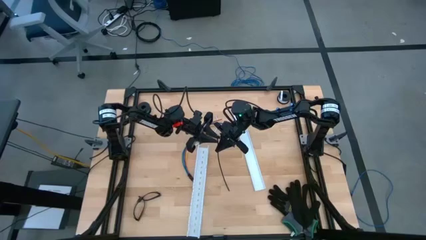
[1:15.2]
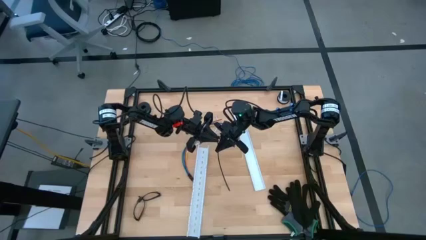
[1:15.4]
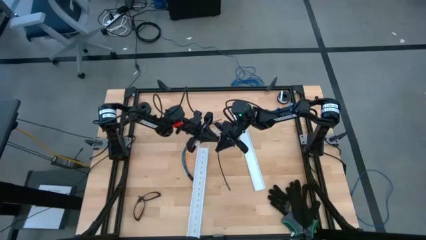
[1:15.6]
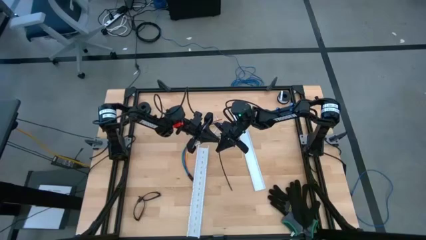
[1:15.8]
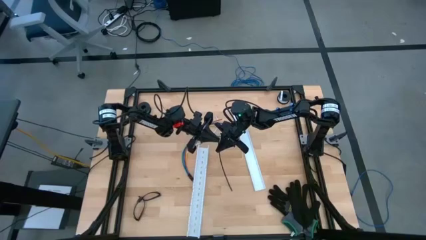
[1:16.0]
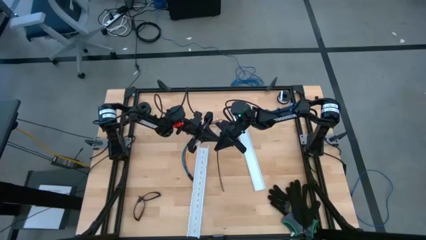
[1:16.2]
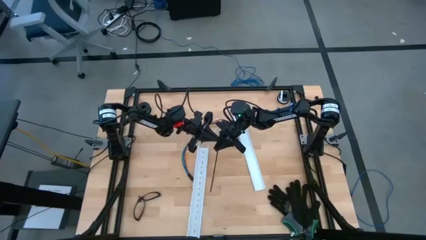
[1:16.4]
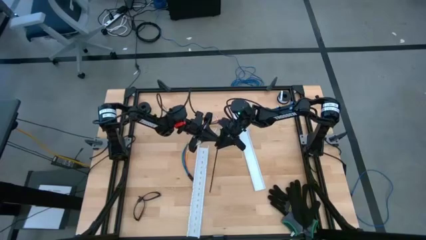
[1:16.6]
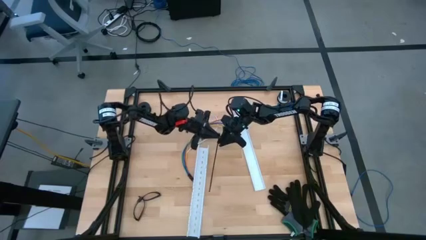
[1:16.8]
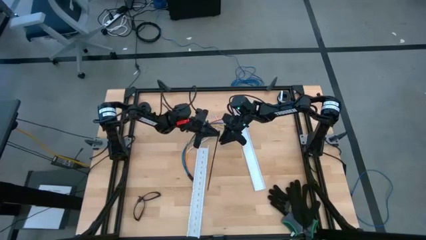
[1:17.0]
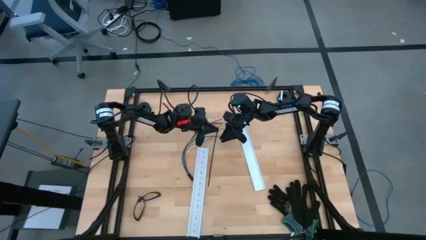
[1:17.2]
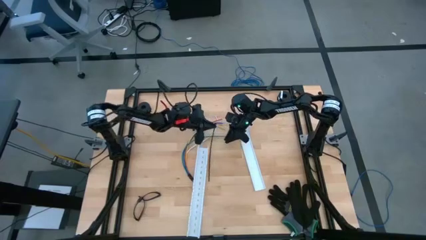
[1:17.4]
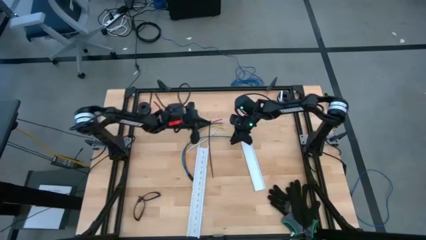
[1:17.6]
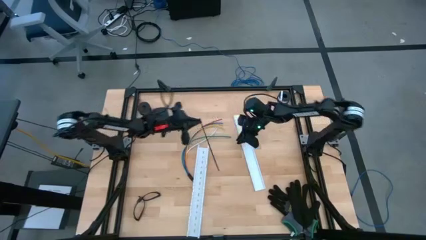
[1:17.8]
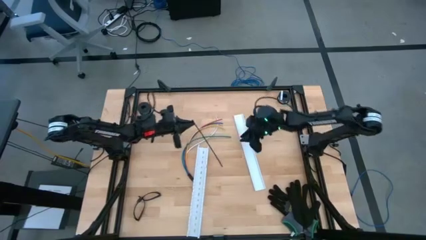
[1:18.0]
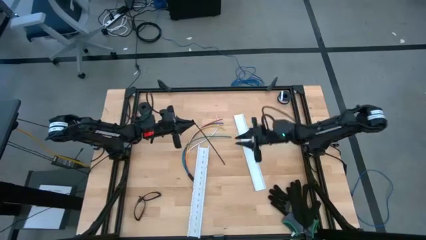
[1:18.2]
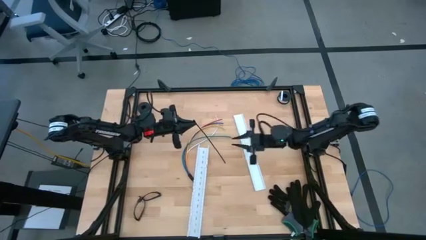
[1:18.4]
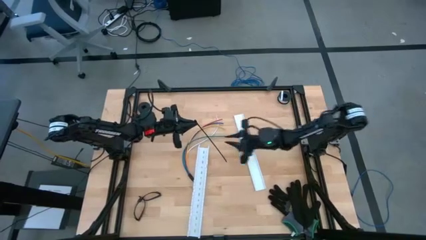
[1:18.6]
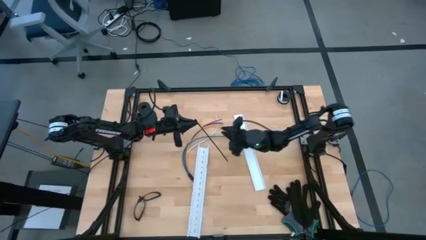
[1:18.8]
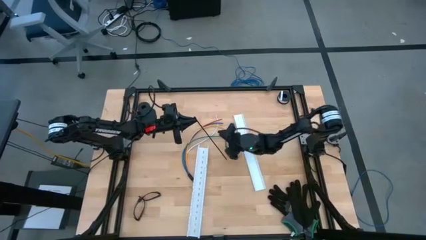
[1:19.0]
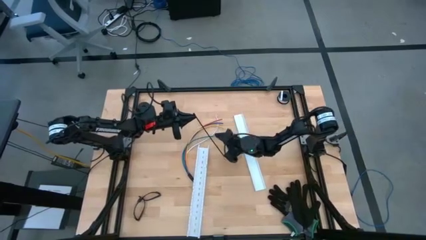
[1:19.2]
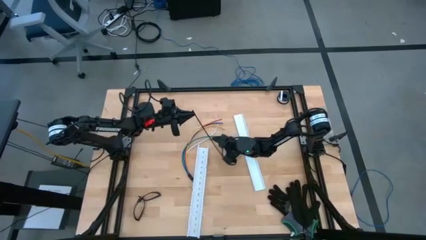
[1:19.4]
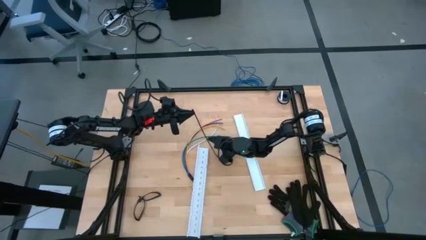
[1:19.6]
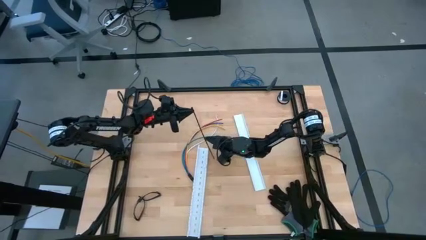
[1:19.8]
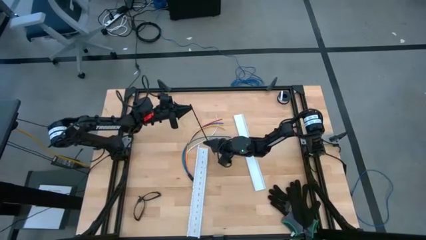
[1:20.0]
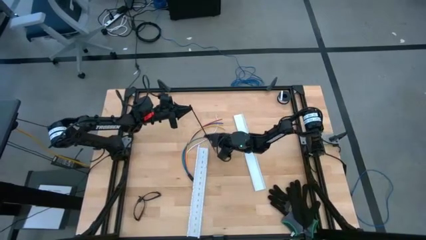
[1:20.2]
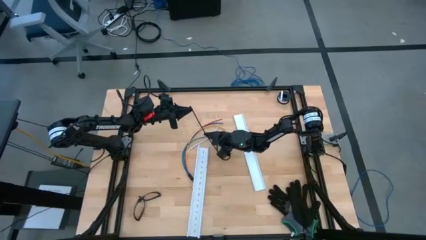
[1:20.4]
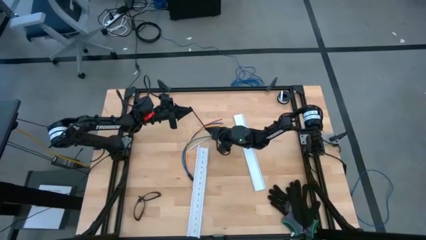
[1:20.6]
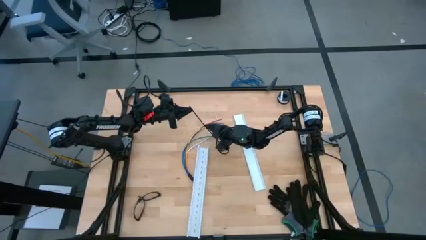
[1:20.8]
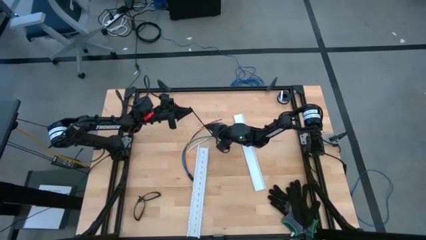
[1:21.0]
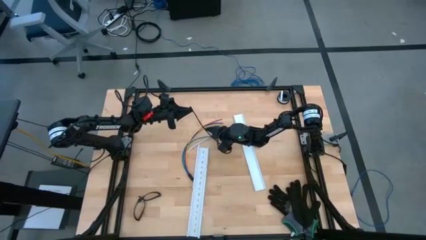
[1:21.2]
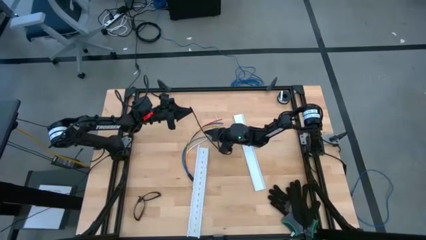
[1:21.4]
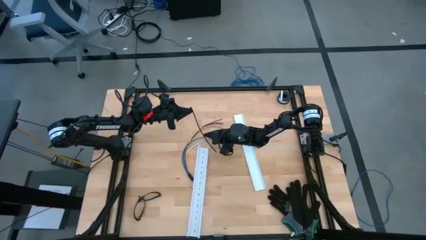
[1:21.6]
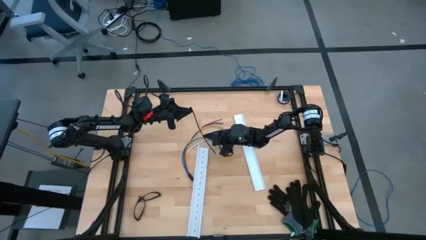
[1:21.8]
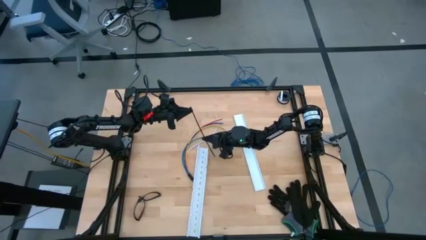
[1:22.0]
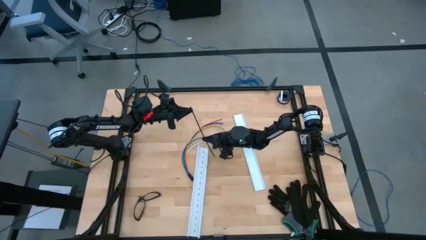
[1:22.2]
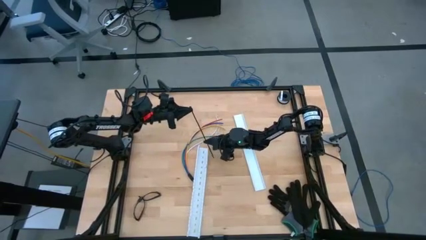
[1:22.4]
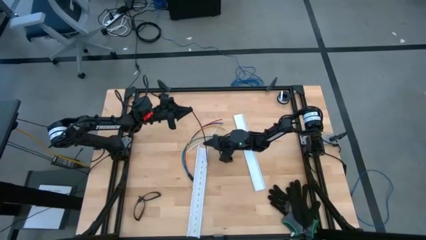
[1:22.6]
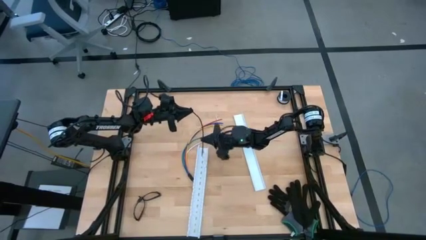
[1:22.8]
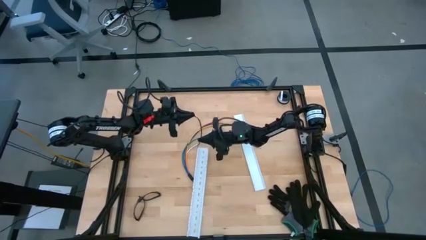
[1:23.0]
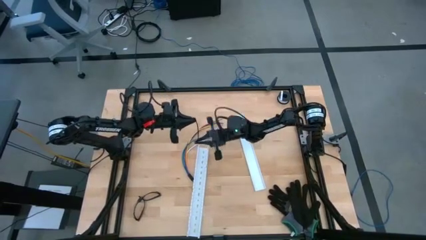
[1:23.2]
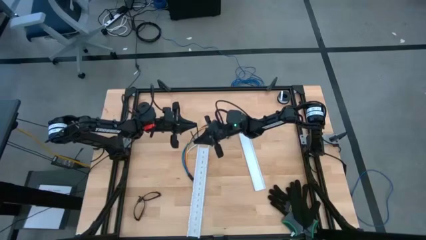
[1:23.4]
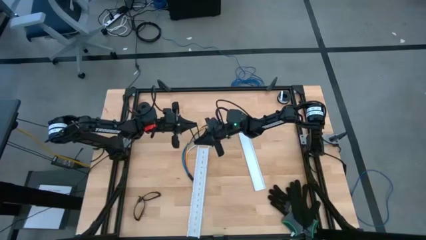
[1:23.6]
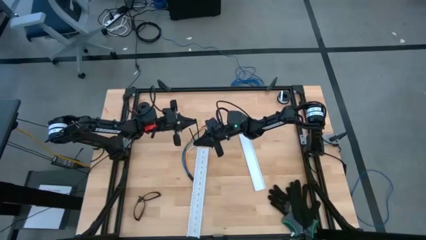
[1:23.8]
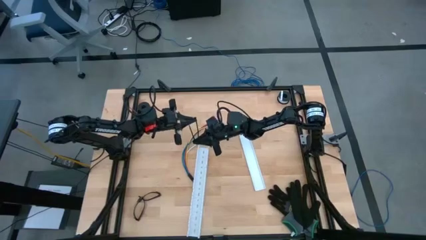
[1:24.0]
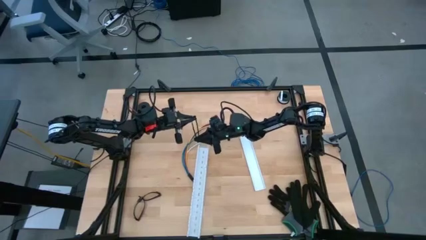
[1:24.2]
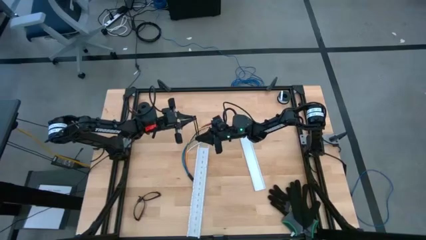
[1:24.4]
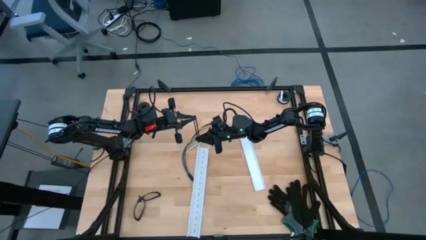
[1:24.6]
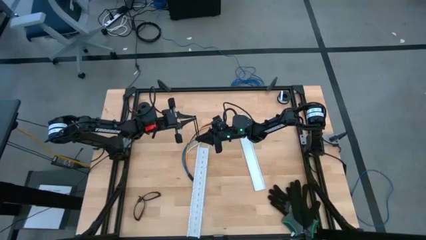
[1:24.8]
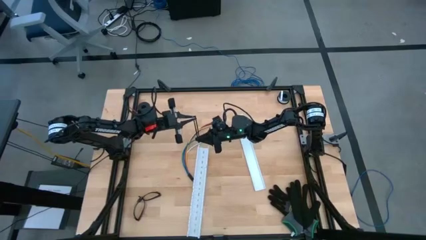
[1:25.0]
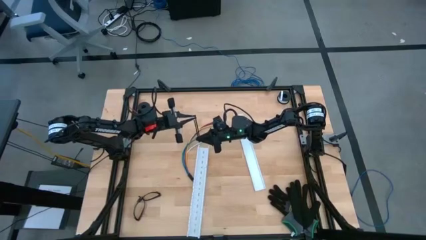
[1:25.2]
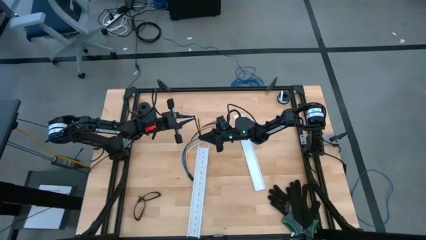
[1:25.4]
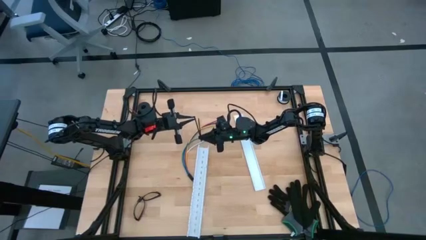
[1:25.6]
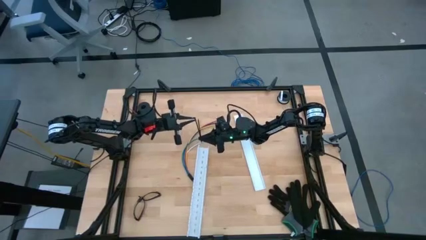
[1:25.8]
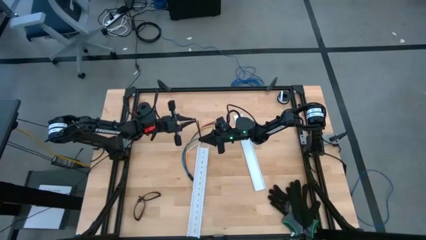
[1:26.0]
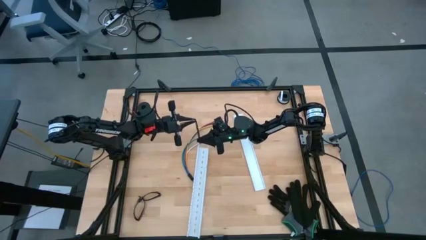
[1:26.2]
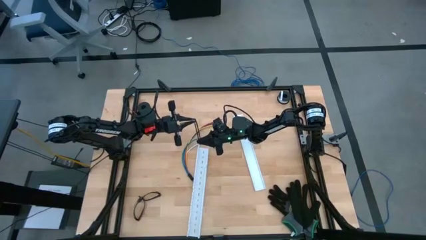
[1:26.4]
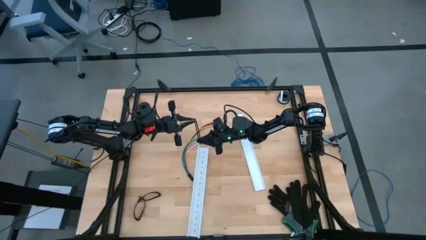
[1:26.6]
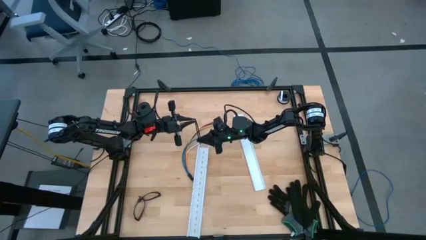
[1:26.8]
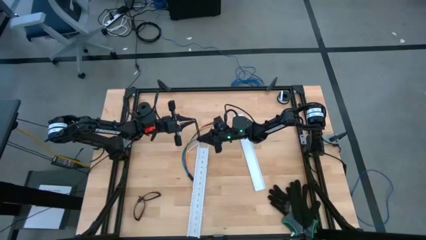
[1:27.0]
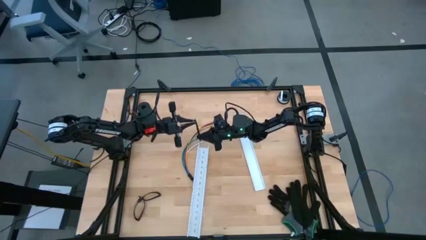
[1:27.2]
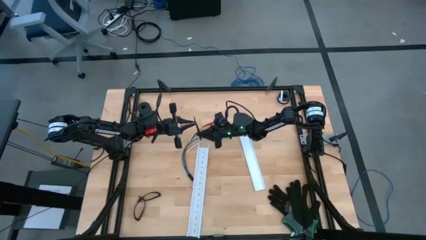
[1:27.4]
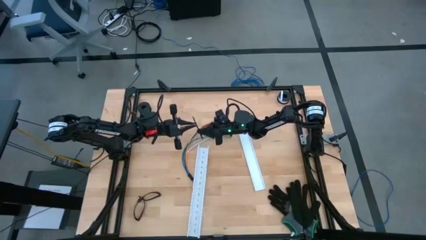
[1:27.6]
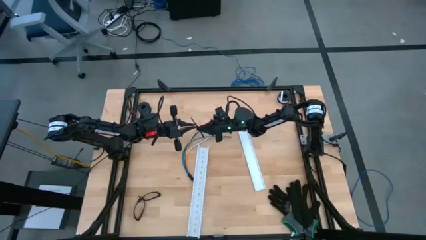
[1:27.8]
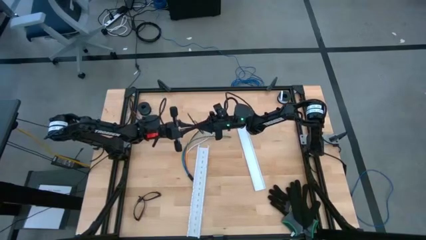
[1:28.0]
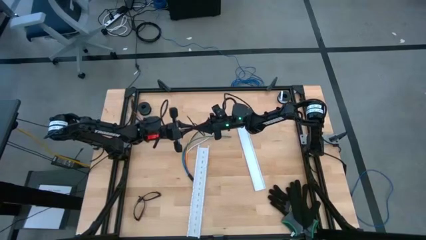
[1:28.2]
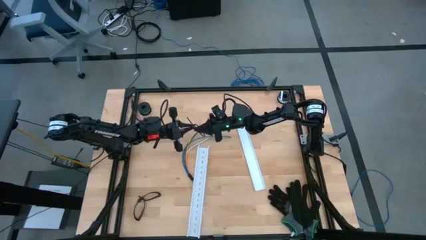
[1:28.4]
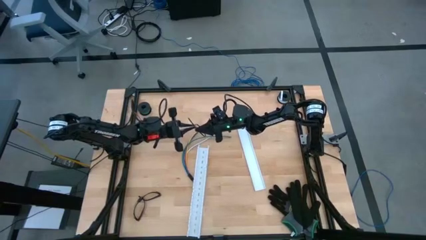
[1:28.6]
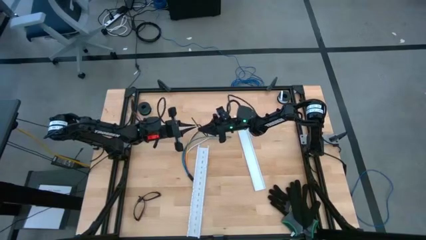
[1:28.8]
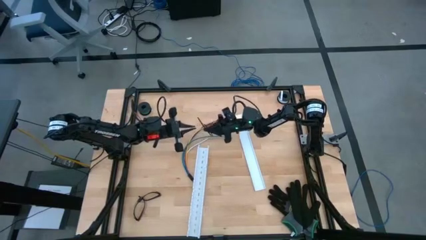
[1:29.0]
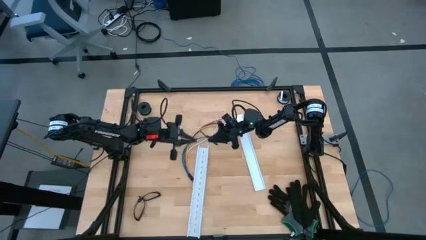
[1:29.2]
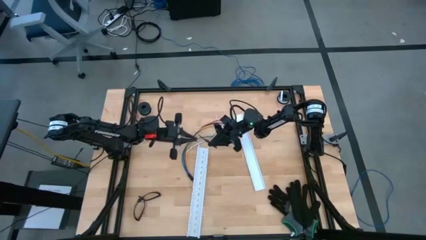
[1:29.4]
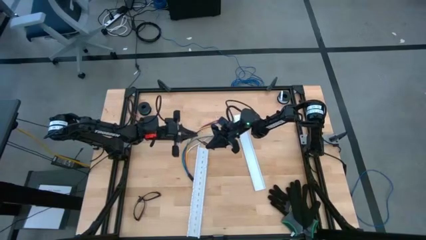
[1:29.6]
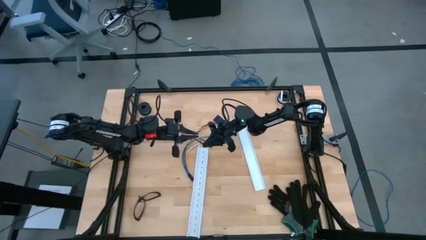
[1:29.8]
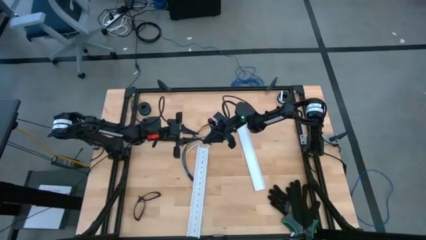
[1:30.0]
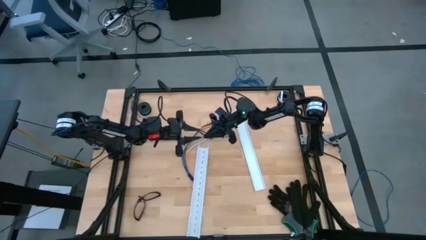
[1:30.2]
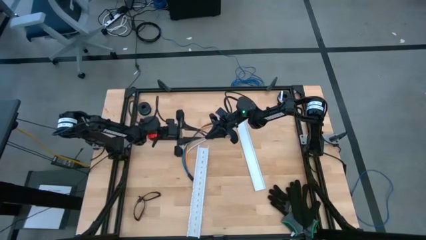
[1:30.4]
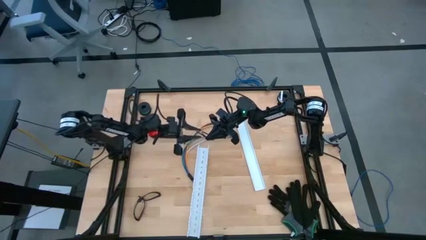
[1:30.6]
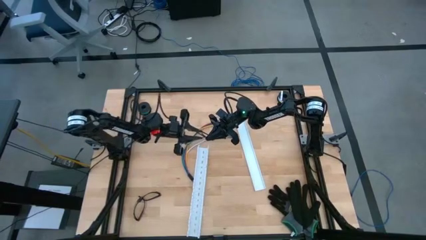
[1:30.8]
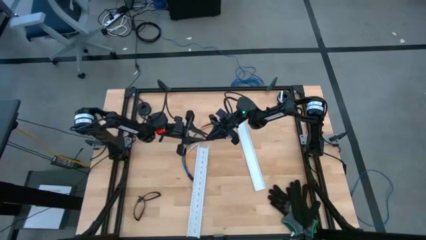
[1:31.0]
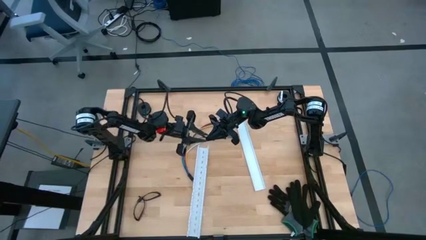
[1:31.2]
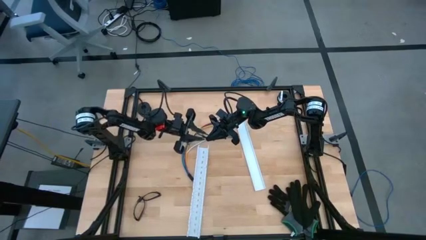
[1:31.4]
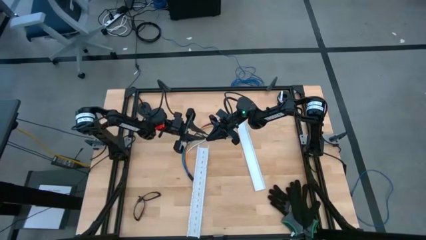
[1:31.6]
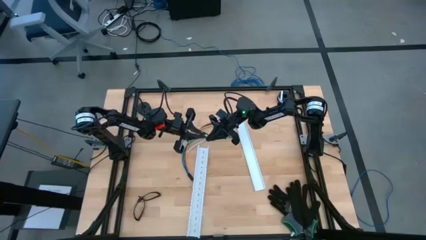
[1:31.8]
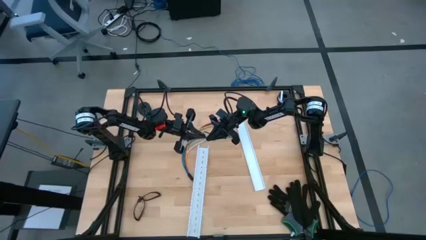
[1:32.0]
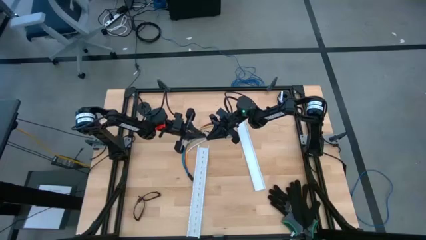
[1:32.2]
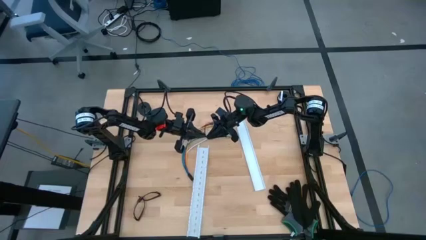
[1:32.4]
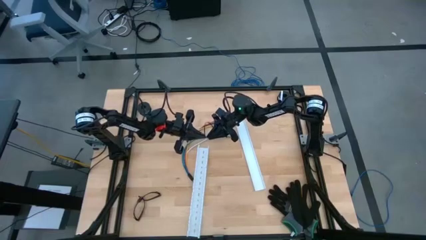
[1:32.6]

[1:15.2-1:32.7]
Task: Ziptie cables
Wrap the black zip tie around the object
